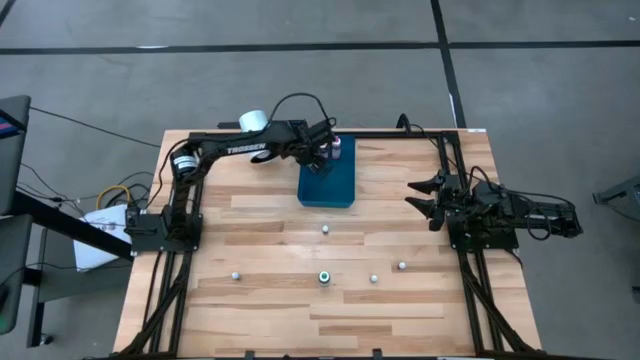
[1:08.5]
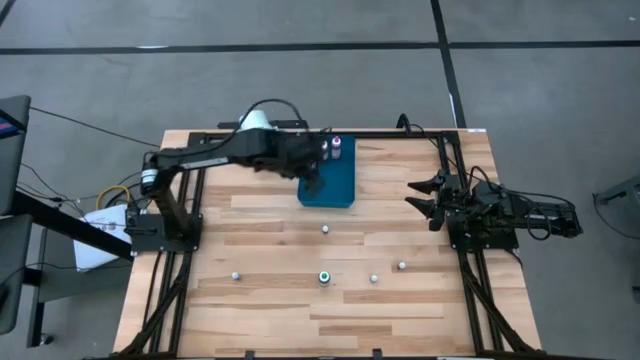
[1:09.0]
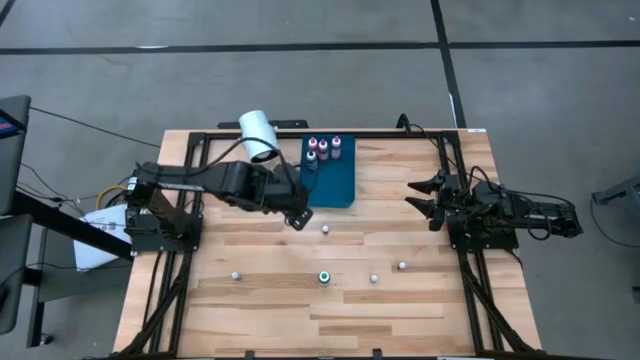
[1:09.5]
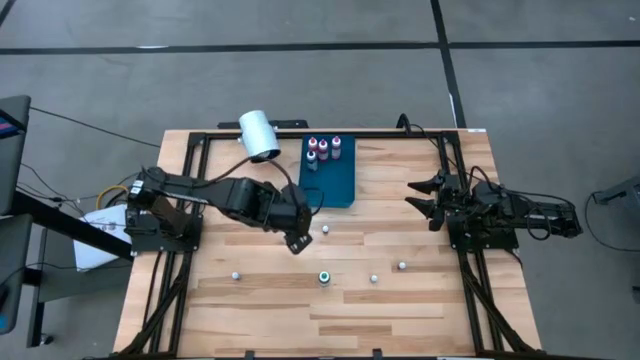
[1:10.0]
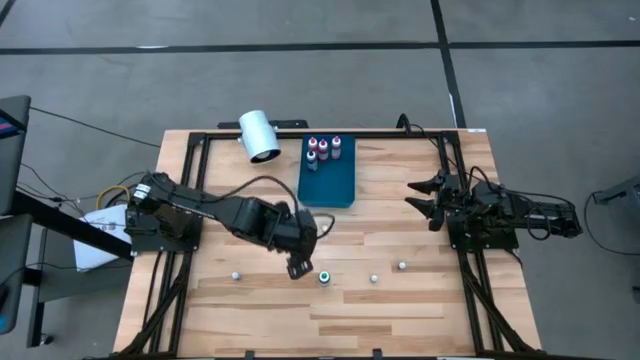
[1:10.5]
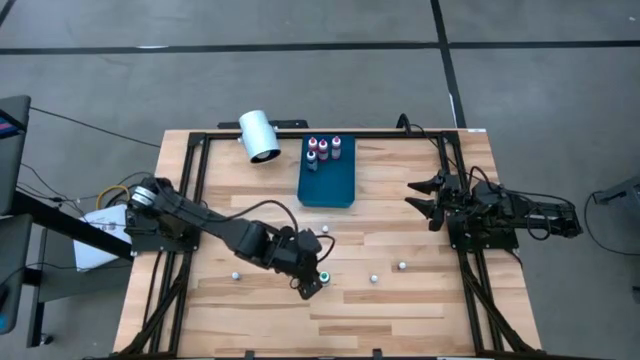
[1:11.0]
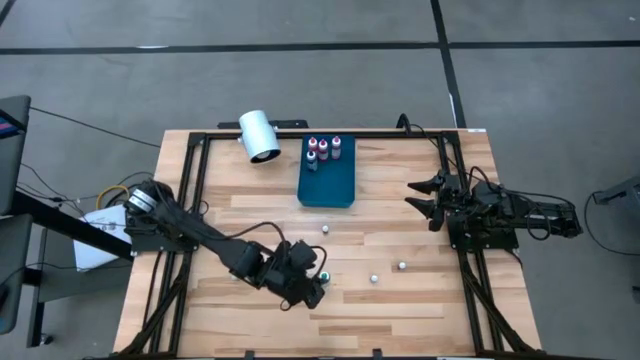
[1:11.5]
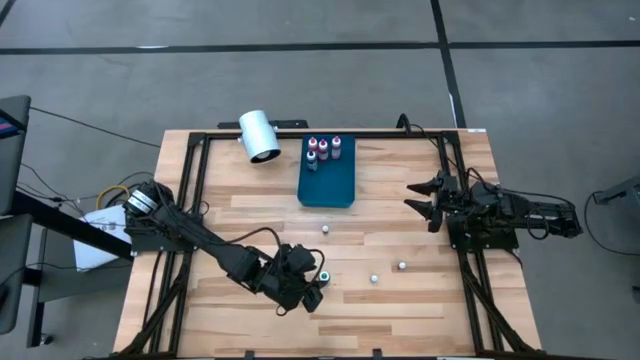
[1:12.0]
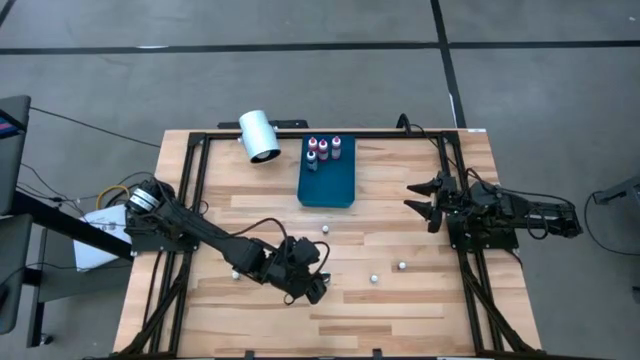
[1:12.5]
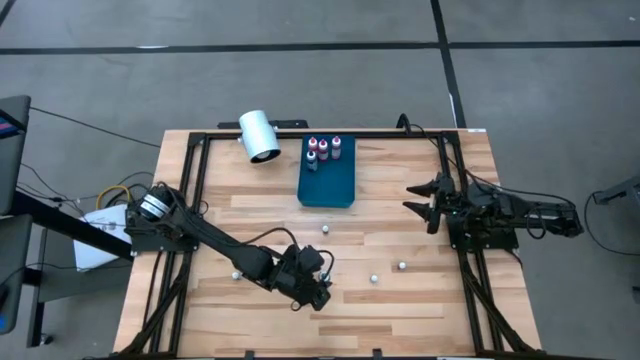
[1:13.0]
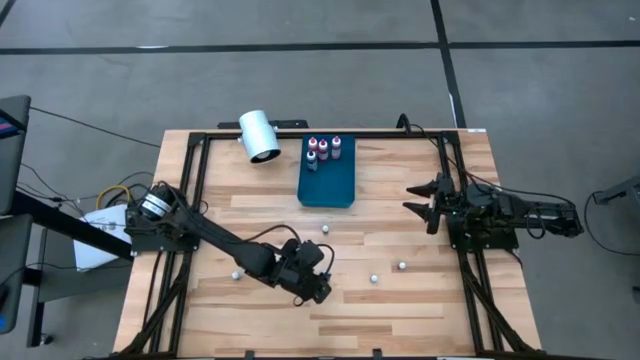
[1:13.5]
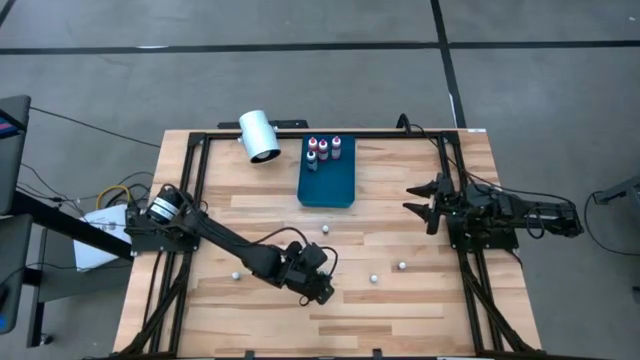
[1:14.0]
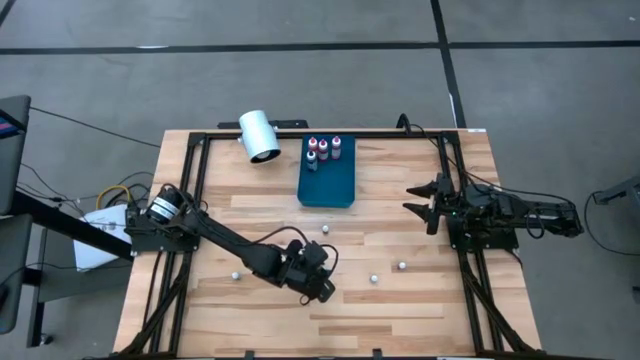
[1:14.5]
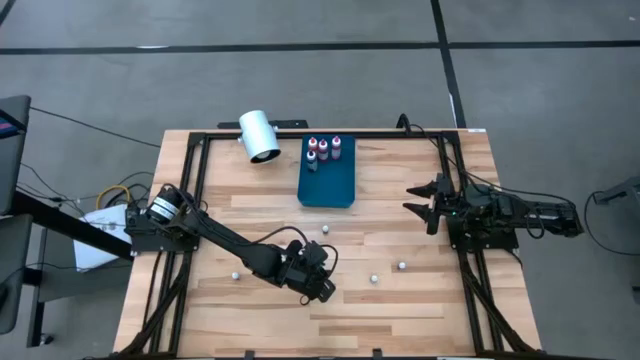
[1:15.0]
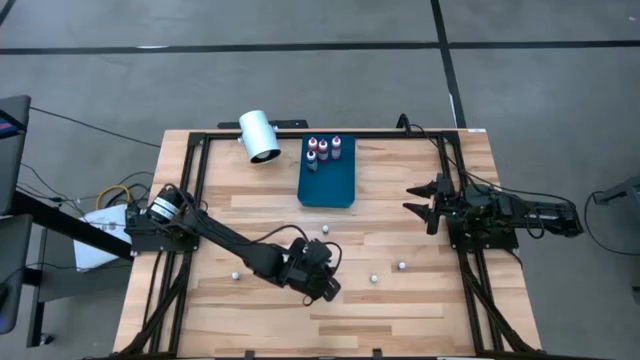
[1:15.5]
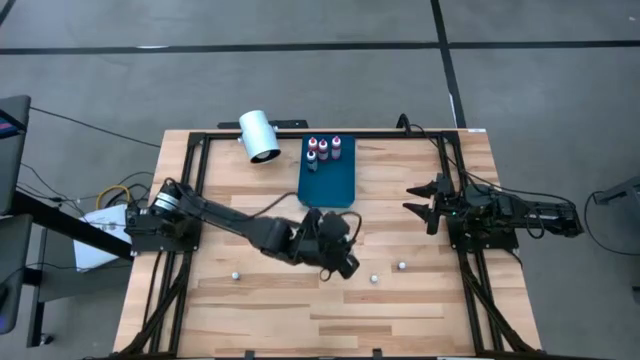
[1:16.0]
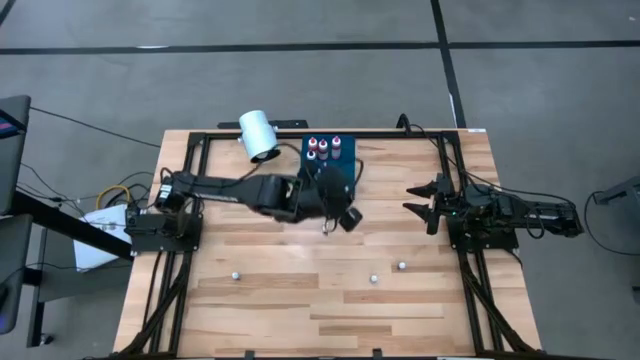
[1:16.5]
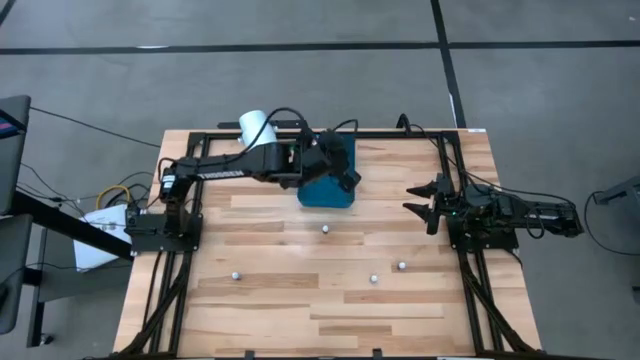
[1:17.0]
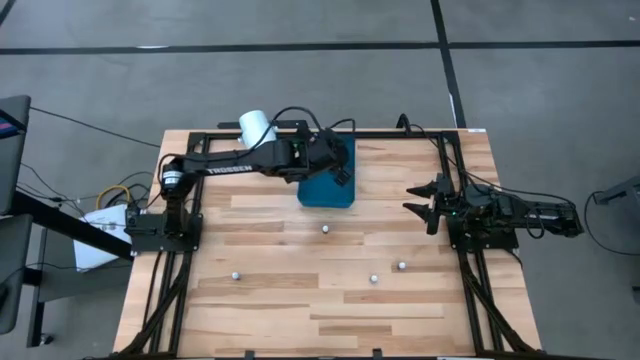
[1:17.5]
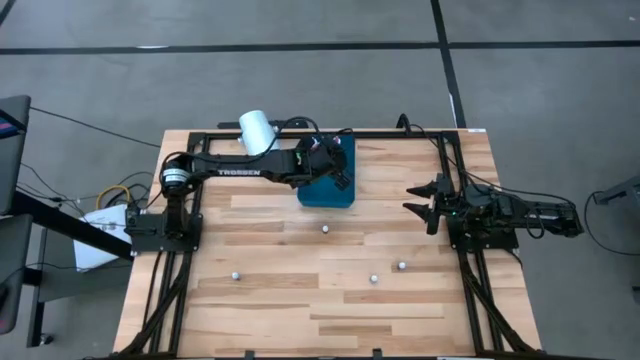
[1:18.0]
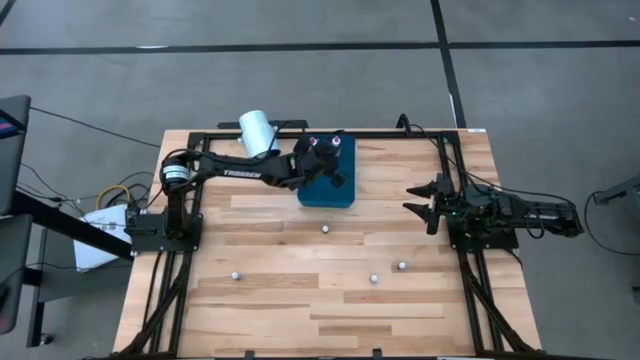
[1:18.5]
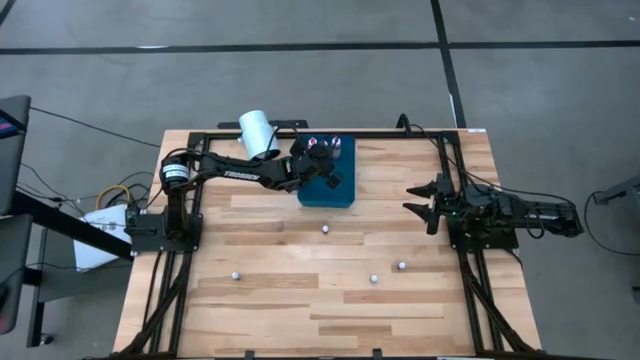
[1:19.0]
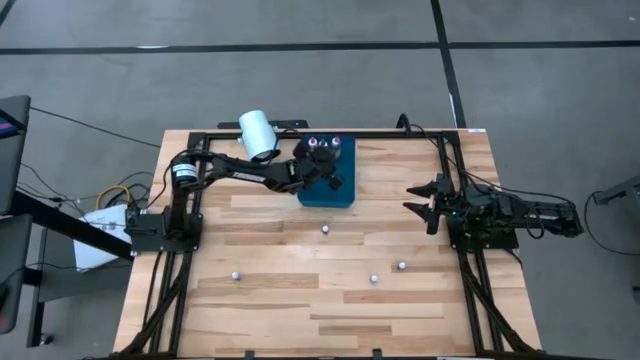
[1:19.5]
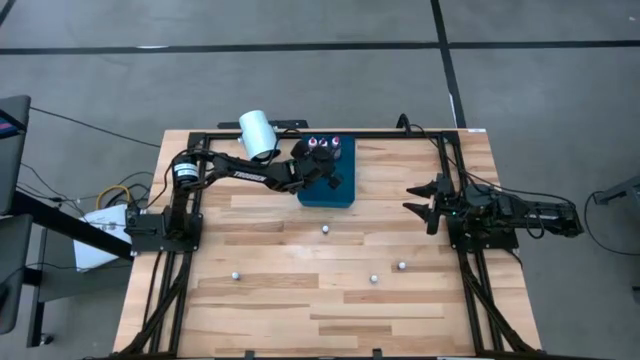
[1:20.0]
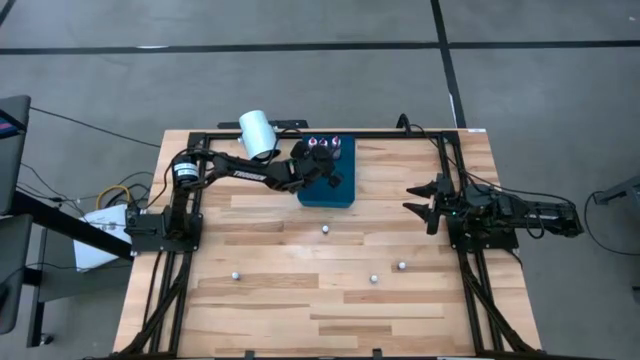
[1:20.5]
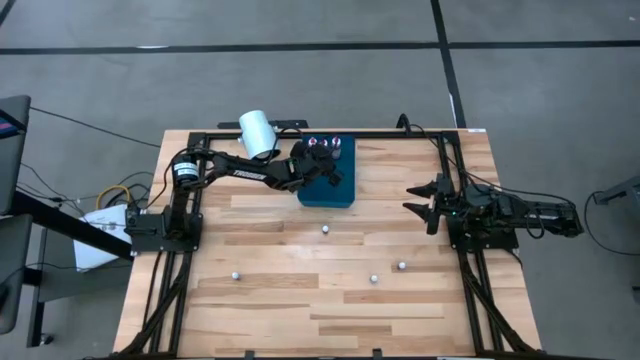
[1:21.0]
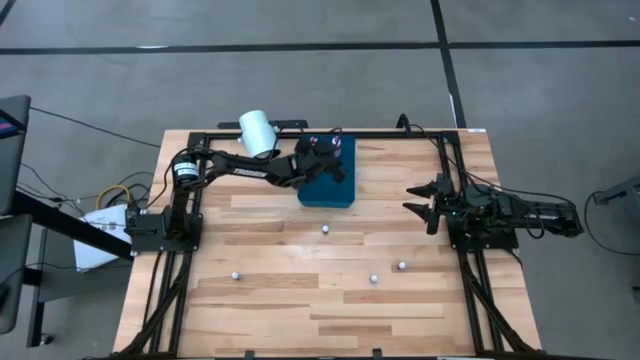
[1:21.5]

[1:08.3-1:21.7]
Task: Pick & Place food coloring
Put the big green food coloring bottle into the blue bin

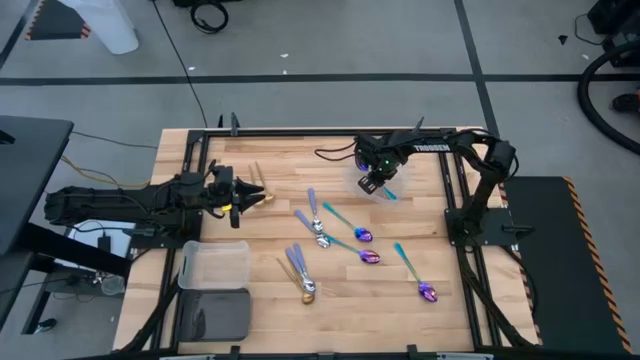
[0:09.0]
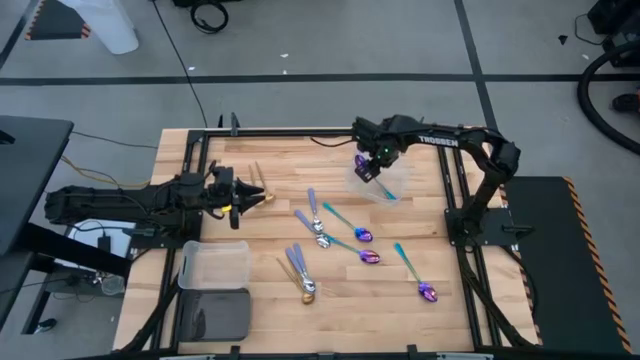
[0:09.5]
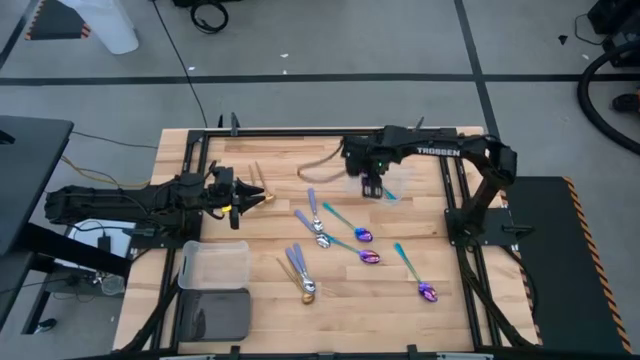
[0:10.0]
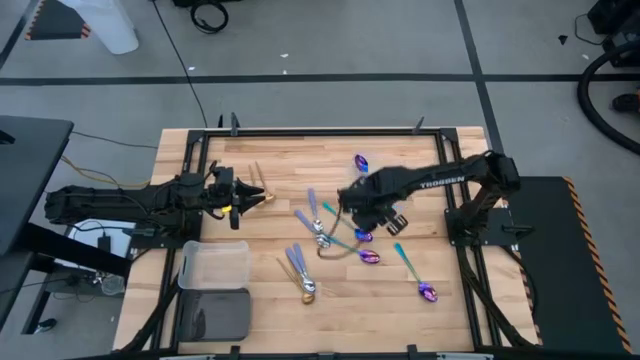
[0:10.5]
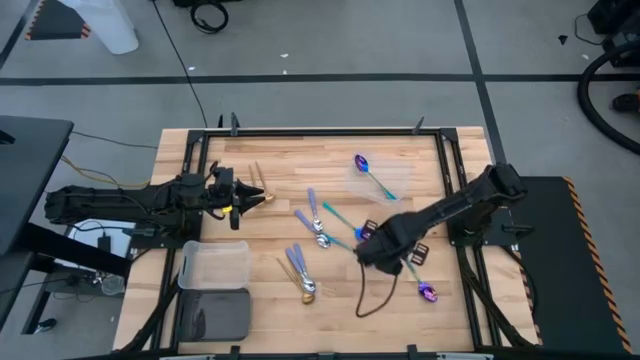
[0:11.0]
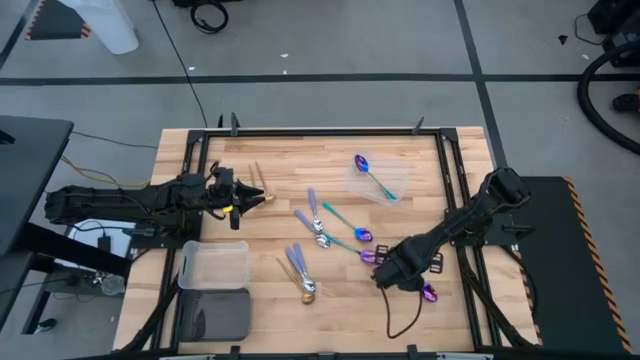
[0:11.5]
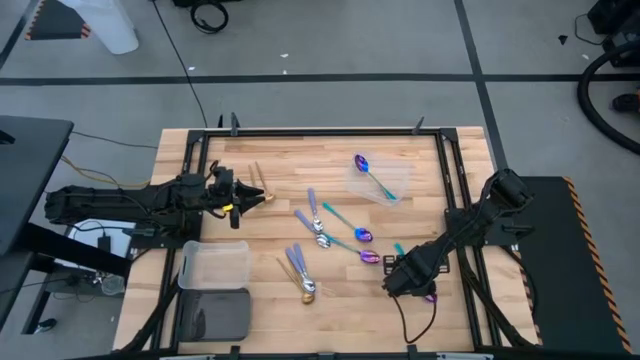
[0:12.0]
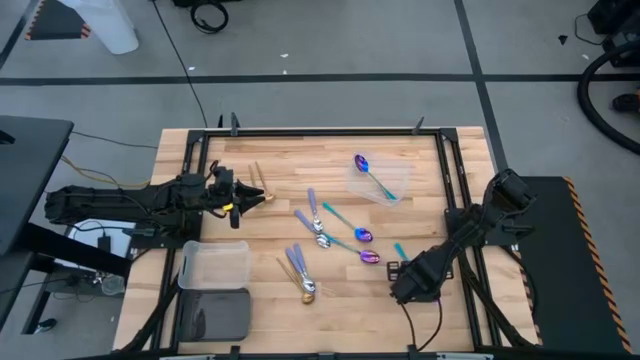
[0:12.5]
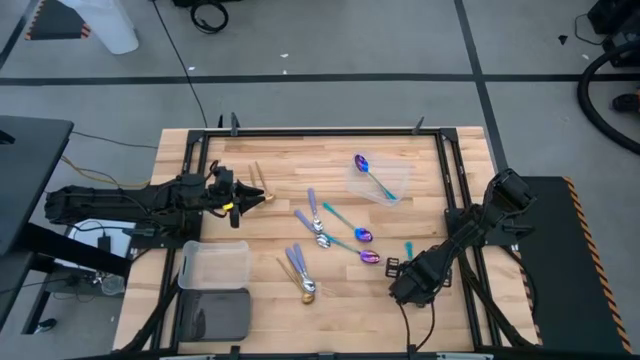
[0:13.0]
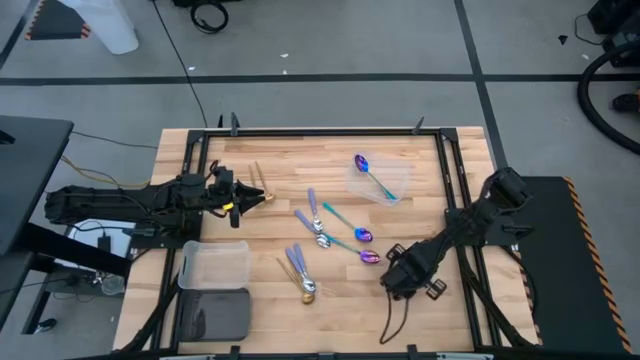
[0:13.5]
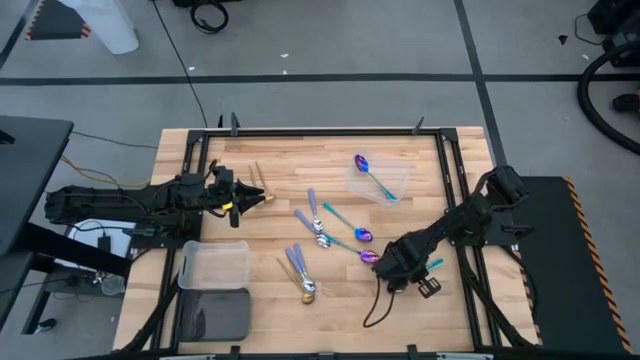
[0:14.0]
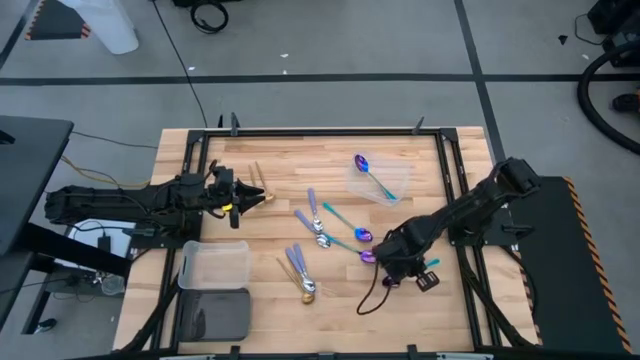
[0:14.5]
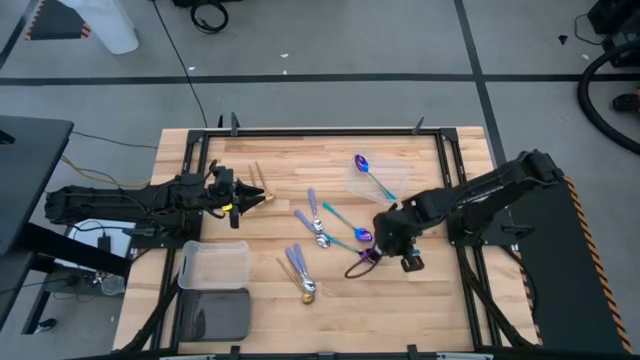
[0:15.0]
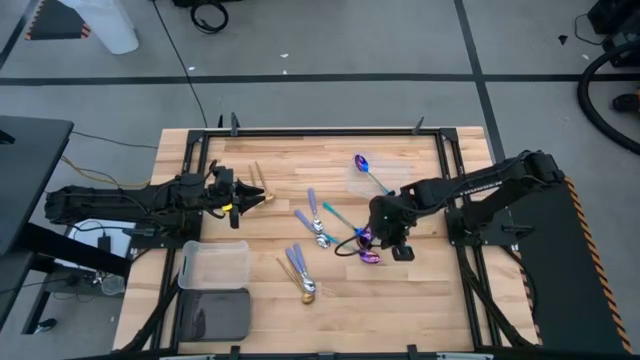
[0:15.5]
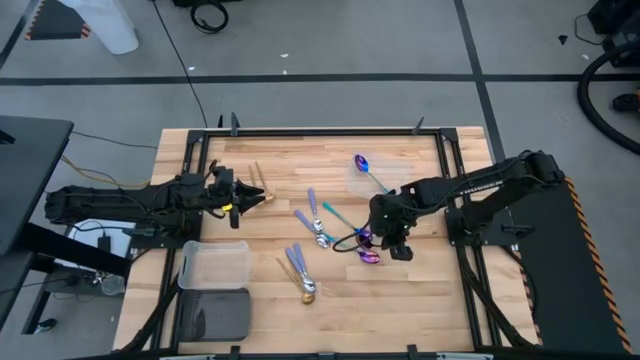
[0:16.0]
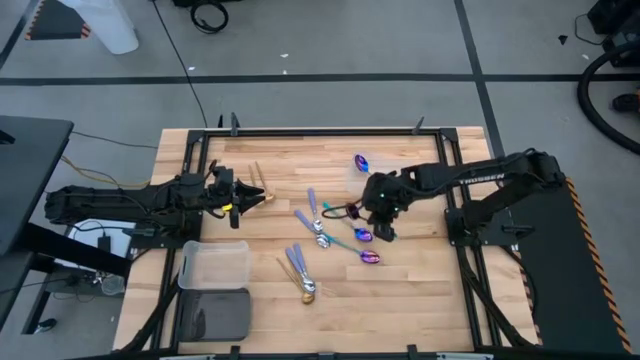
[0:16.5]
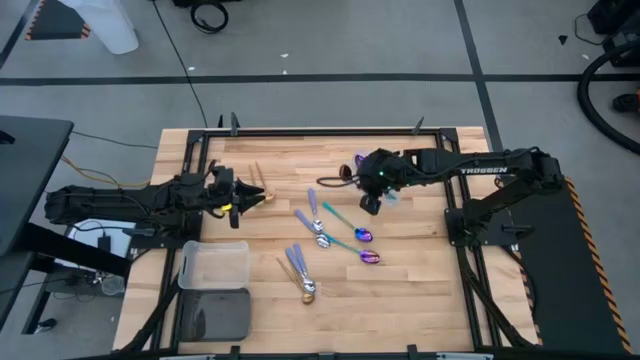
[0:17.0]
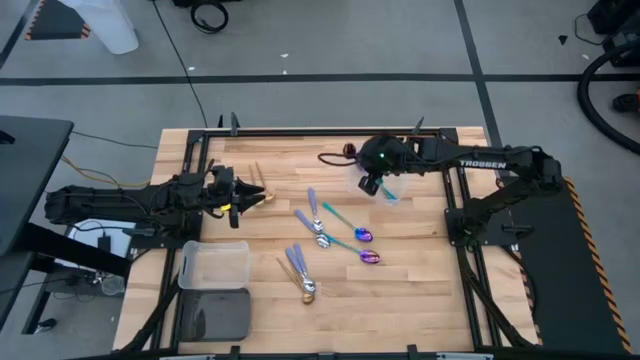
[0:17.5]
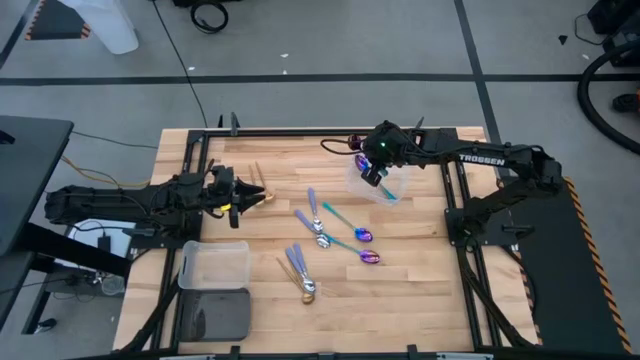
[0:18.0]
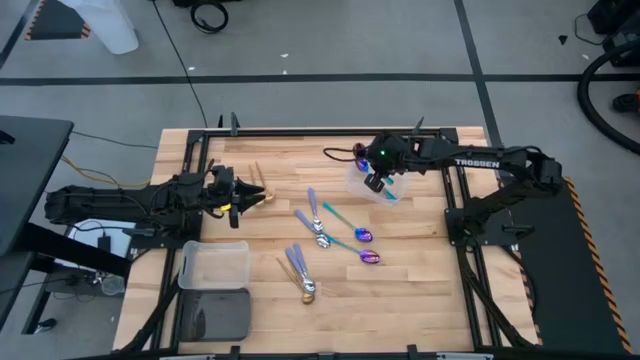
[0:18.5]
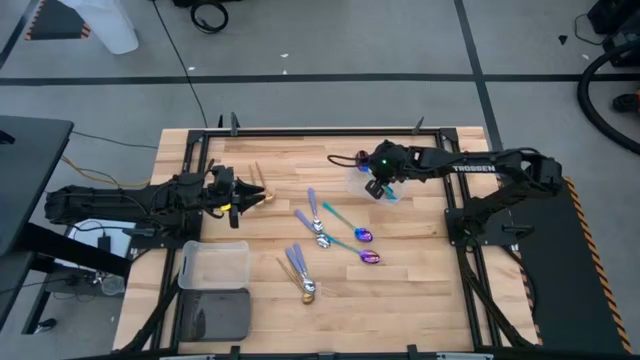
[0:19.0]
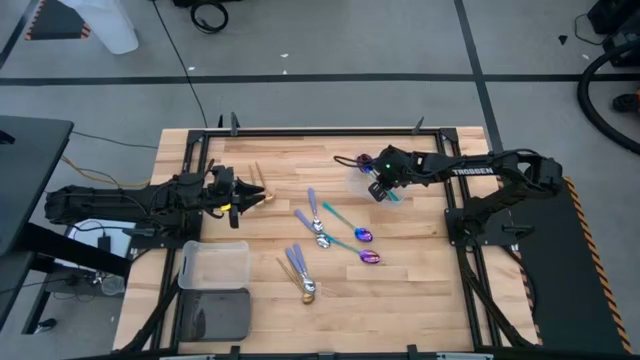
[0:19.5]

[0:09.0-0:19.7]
Task: Sort silverware by color (type)
Put the blue spoon into the top transparent bin
